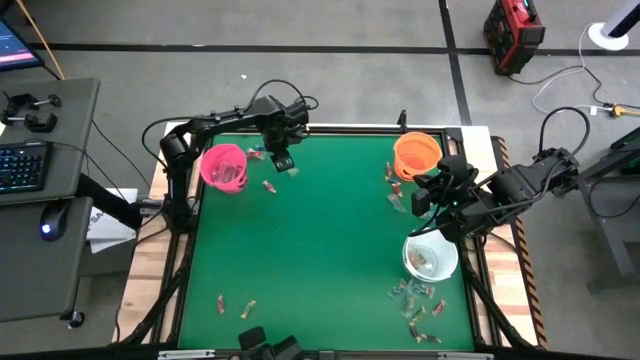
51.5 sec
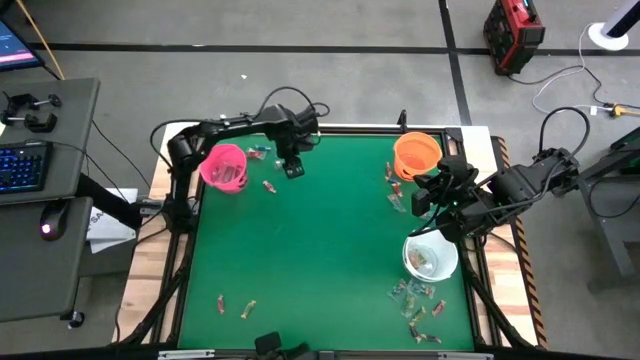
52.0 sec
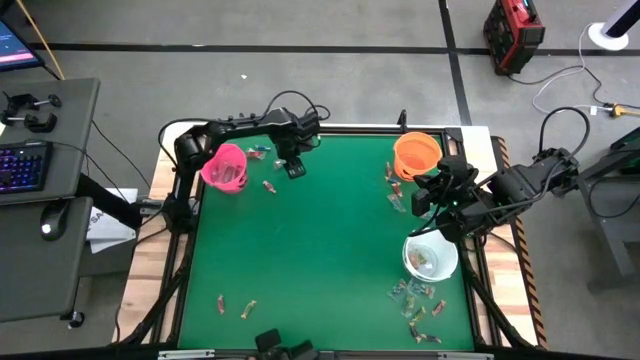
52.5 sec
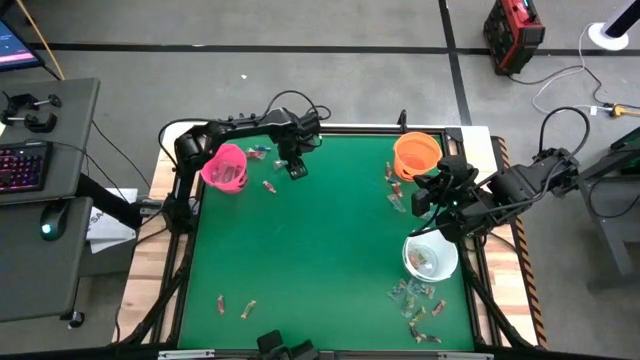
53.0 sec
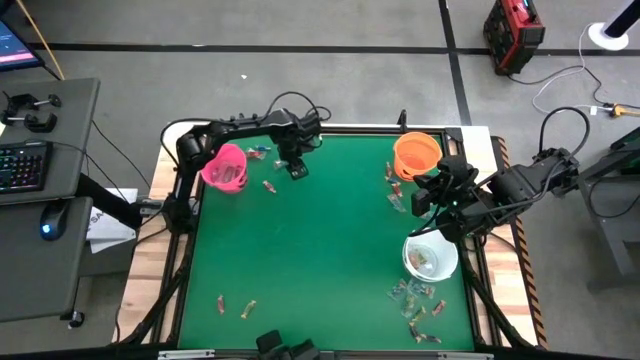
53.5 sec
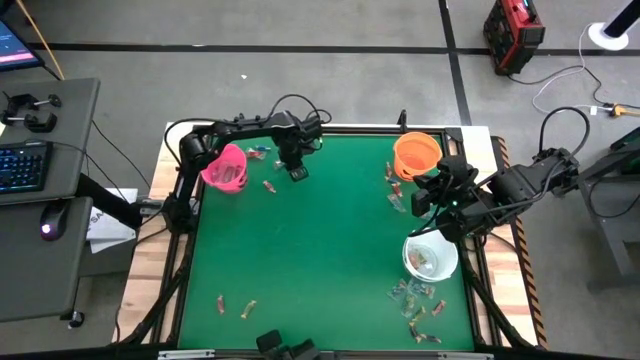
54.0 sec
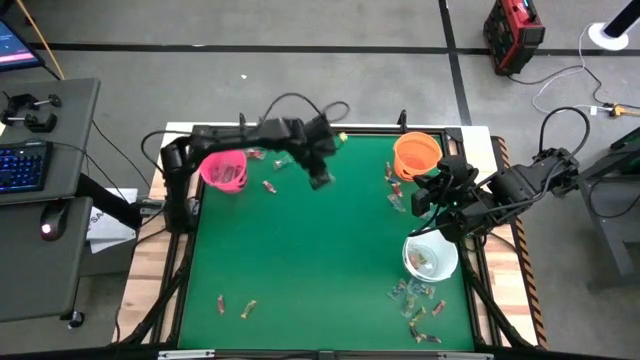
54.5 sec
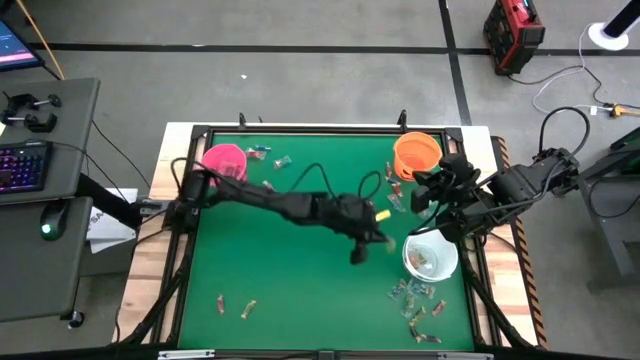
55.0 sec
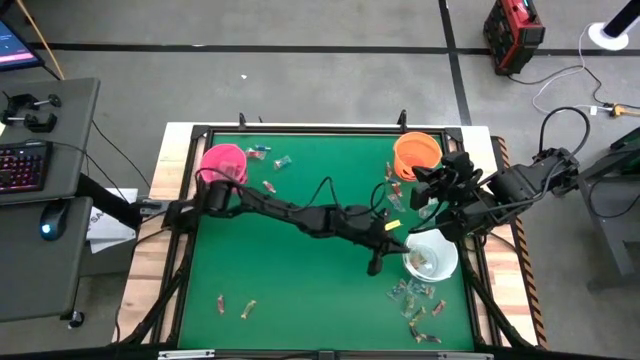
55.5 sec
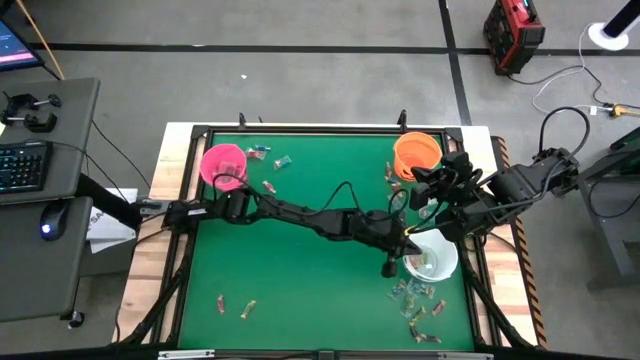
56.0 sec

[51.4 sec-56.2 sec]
Task: Sort candy by brand, put in halloween buckets
Put the green gummy into the white bucket

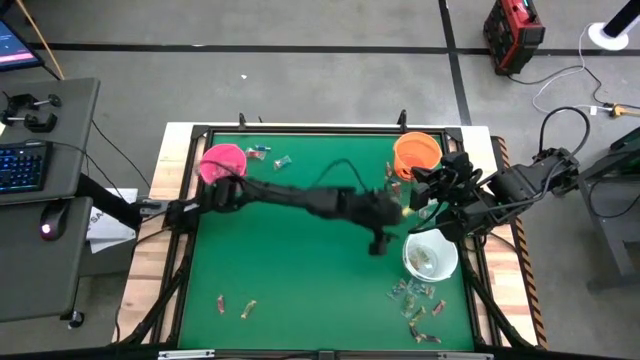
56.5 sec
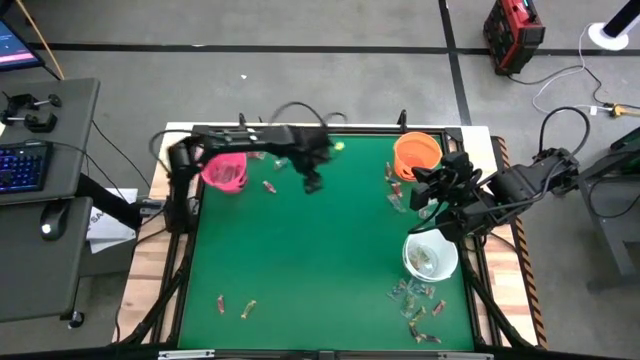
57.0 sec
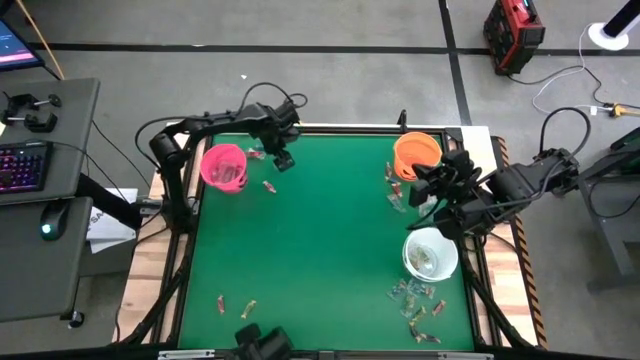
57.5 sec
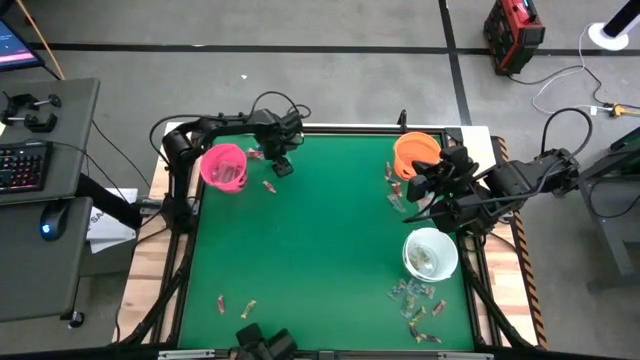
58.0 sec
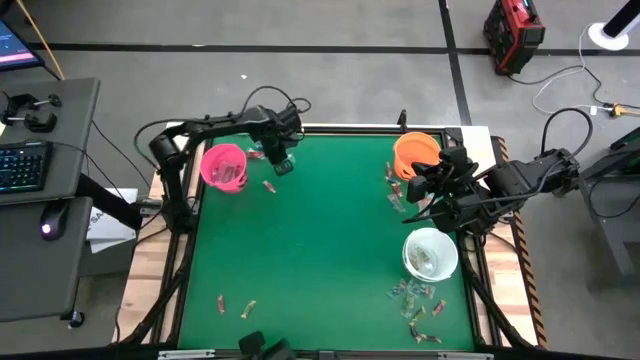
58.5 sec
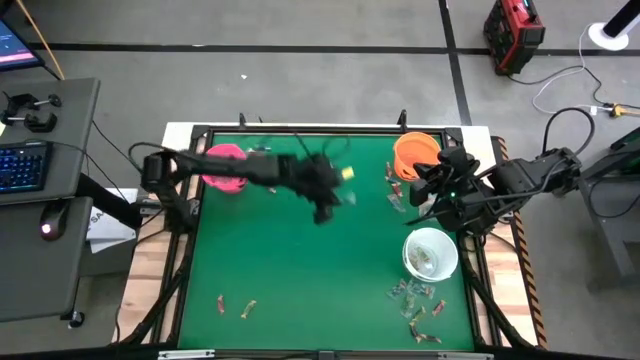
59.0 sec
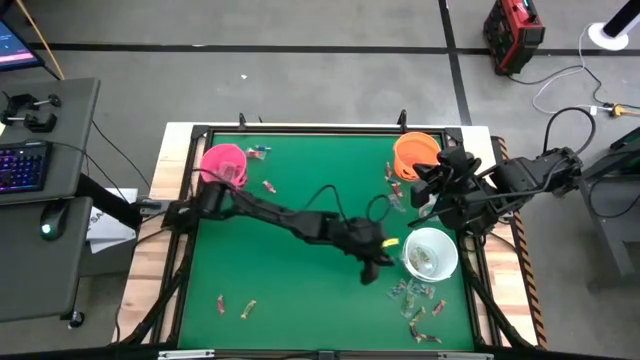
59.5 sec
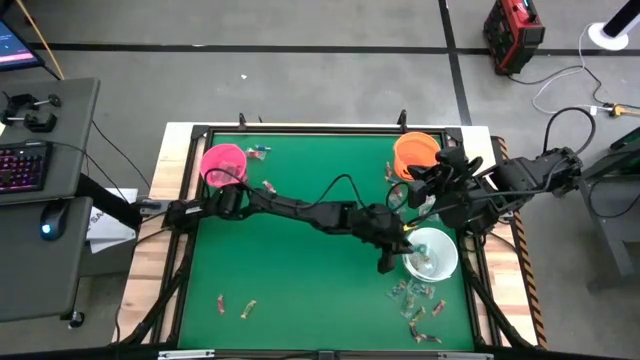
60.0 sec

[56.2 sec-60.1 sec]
Put the blue gummy into the white bucket

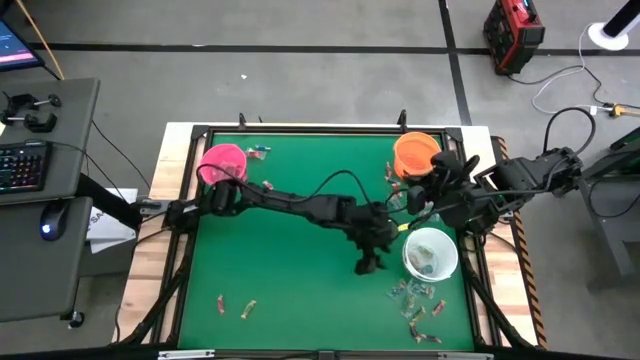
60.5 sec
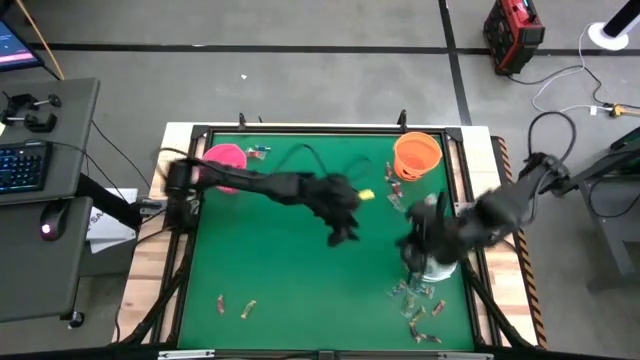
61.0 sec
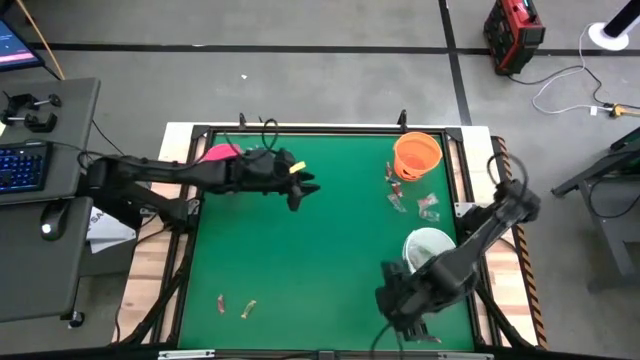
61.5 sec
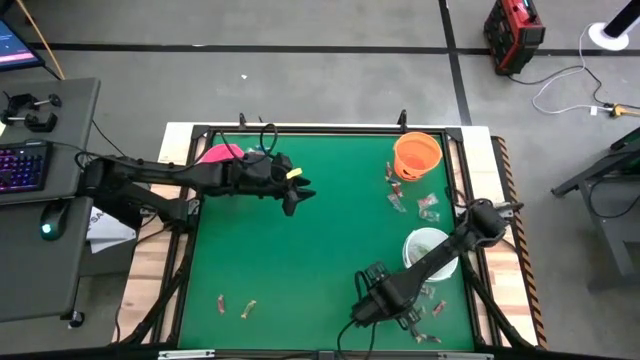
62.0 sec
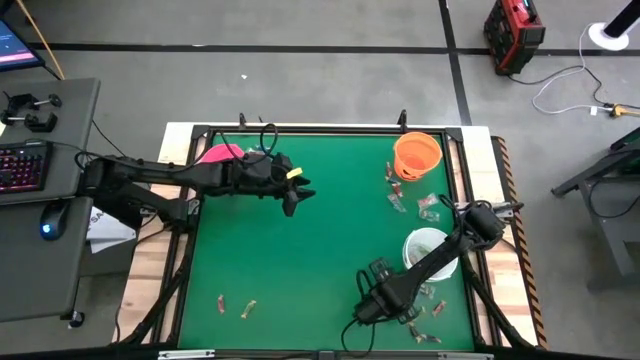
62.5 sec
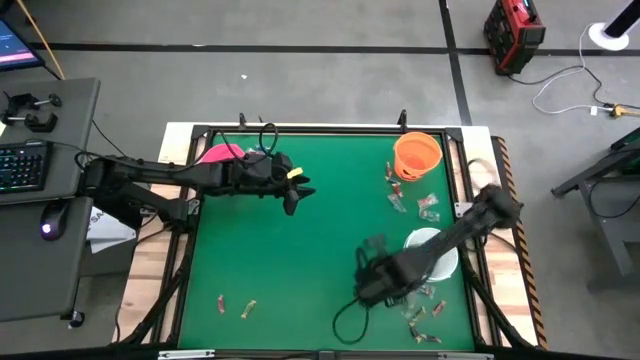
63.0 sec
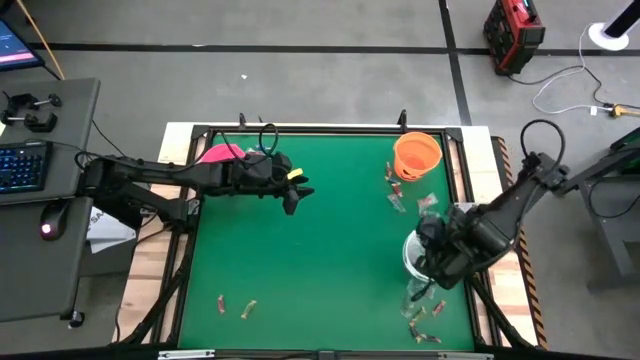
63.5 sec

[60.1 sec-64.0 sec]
Put the blue gummy into the white bucket

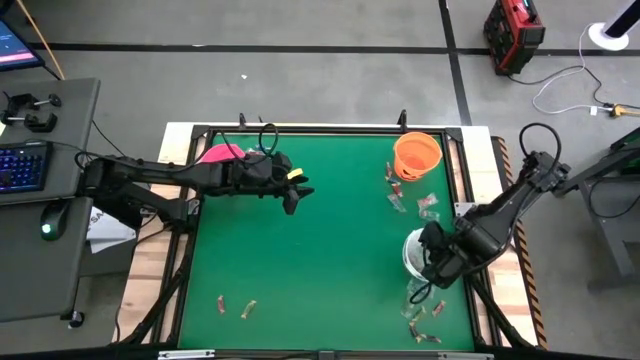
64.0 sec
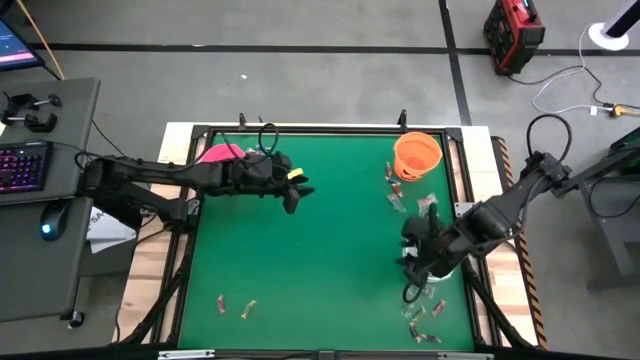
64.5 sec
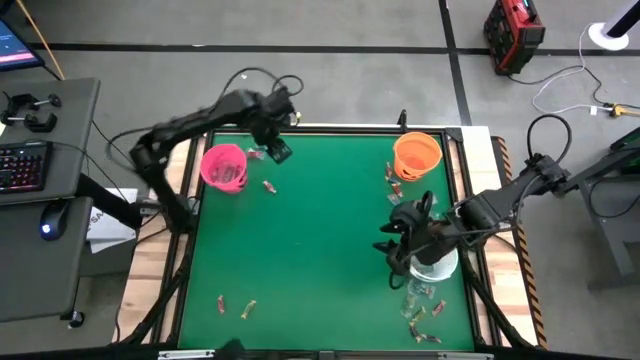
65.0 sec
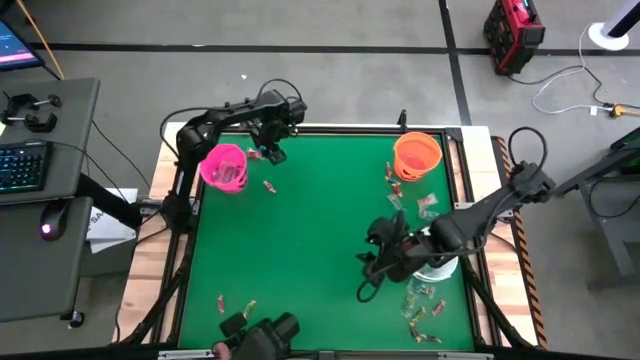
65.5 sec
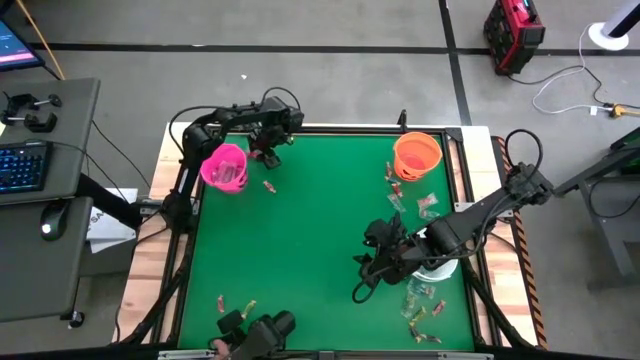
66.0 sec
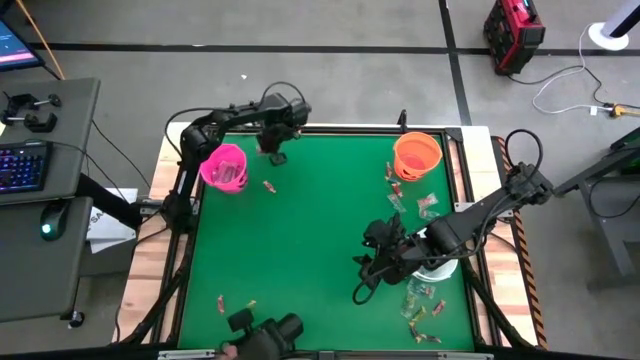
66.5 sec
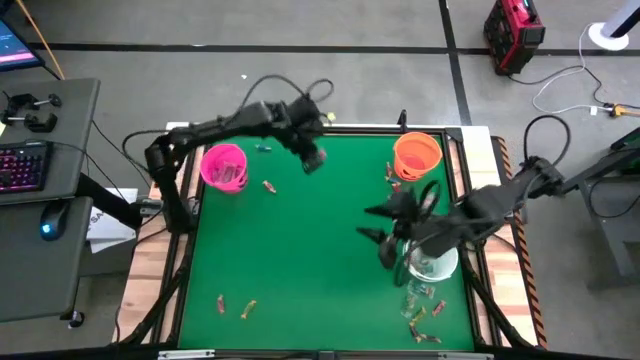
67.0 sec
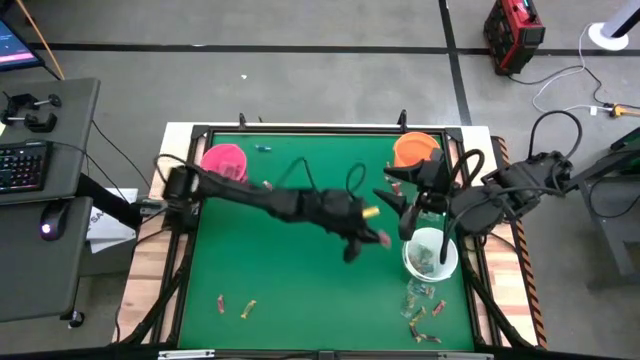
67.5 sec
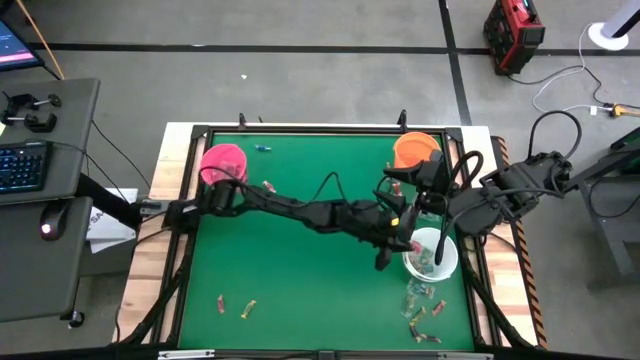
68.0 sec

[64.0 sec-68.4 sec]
Put the orange gummy into the white bucket

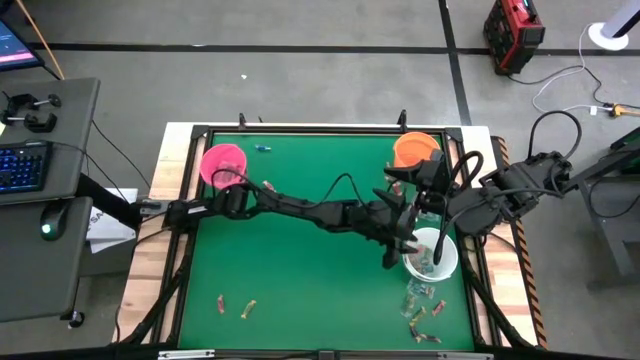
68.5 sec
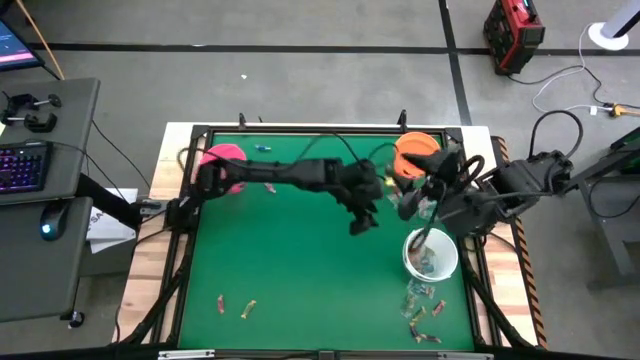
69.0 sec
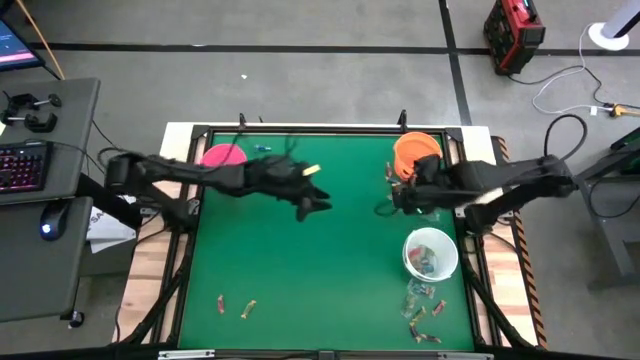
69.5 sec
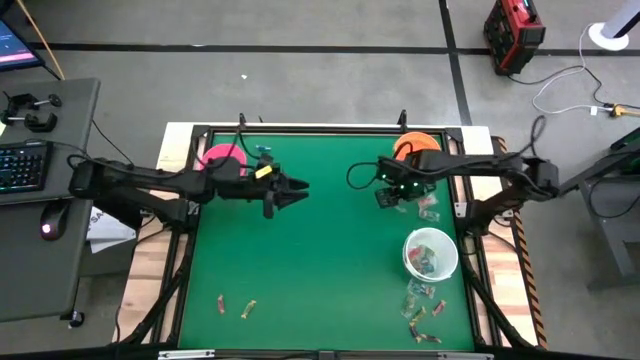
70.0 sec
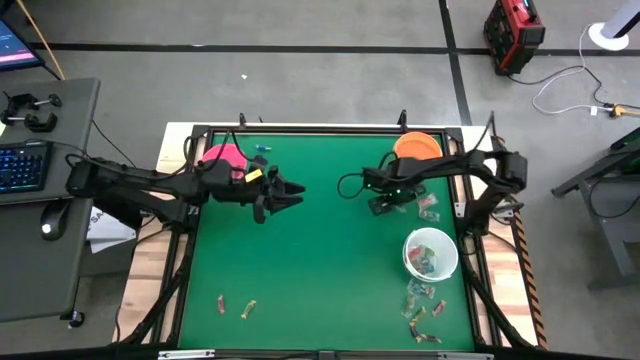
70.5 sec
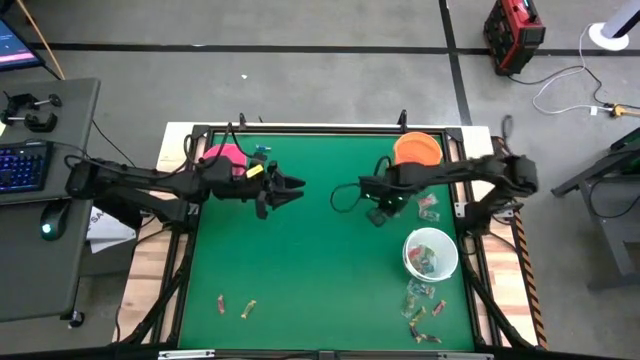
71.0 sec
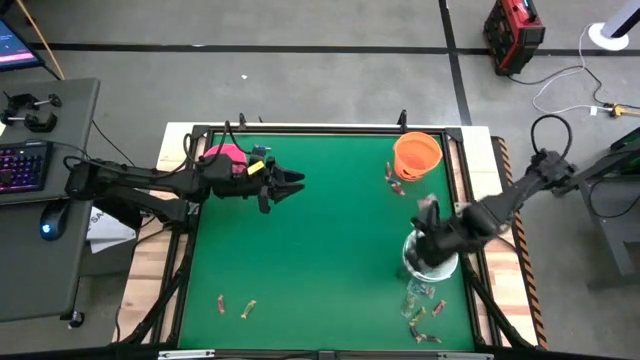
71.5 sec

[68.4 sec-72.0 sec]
Put the blue gummy into the white bucket
